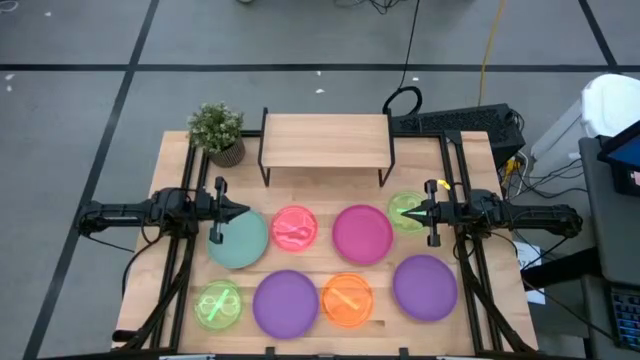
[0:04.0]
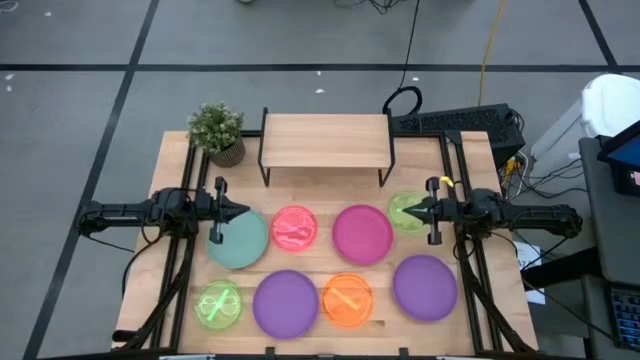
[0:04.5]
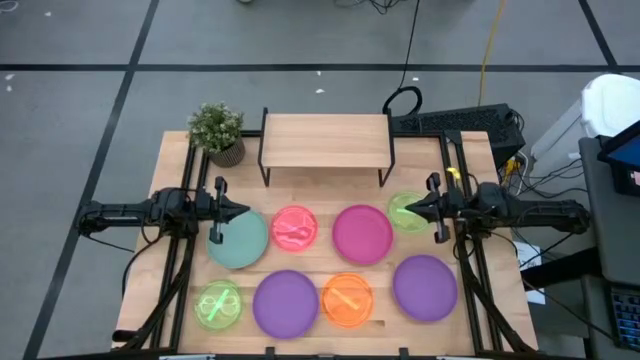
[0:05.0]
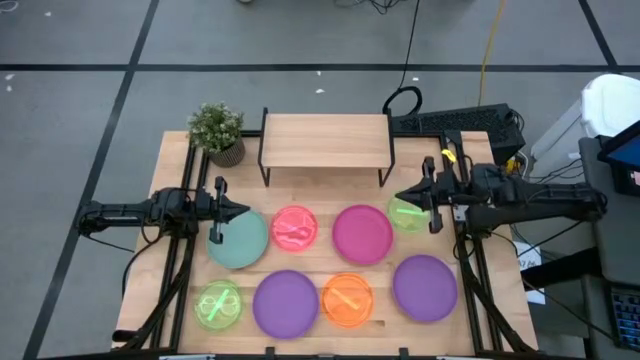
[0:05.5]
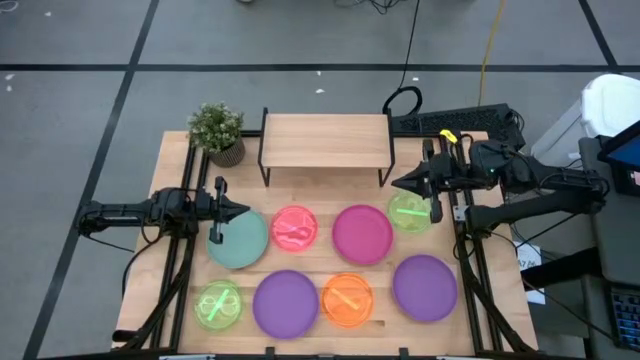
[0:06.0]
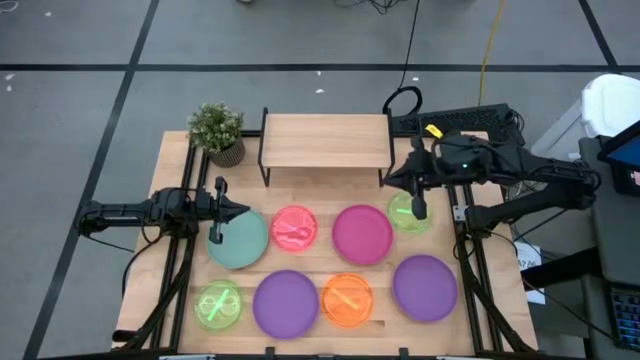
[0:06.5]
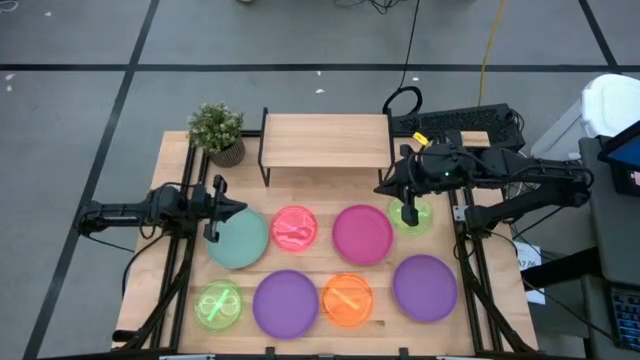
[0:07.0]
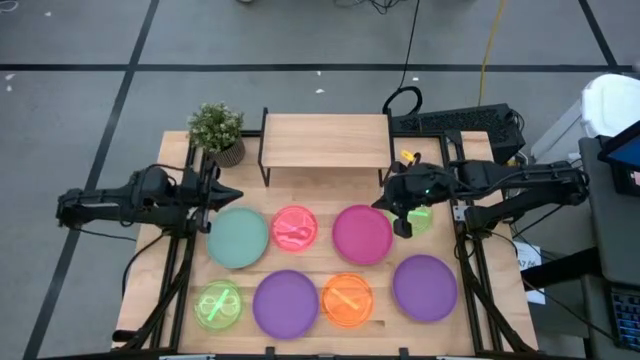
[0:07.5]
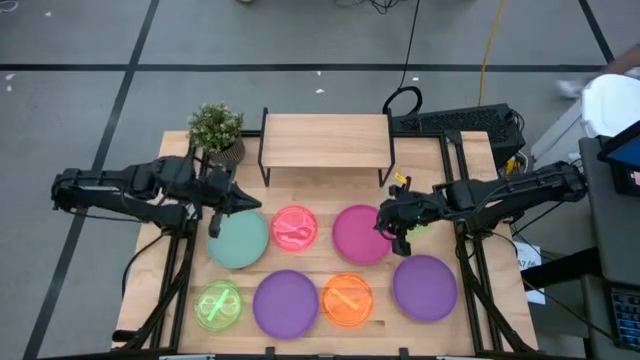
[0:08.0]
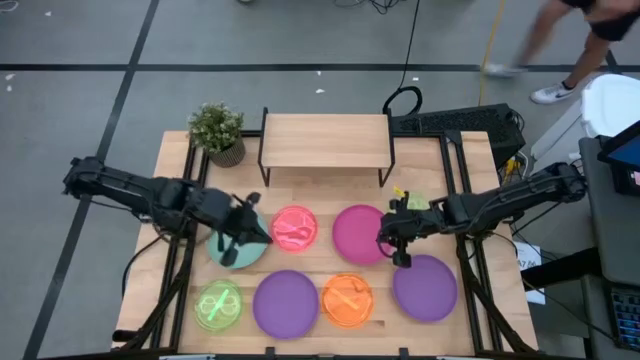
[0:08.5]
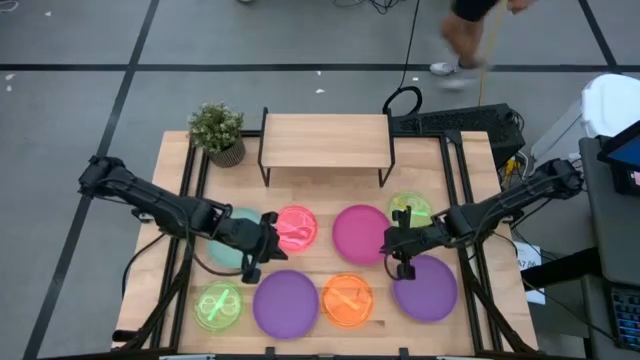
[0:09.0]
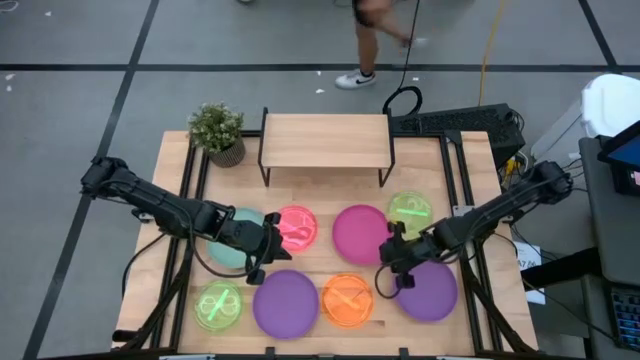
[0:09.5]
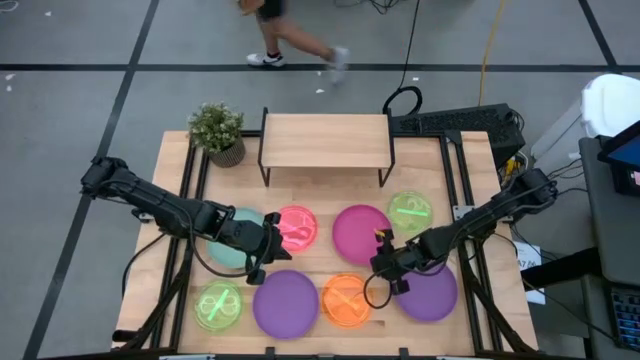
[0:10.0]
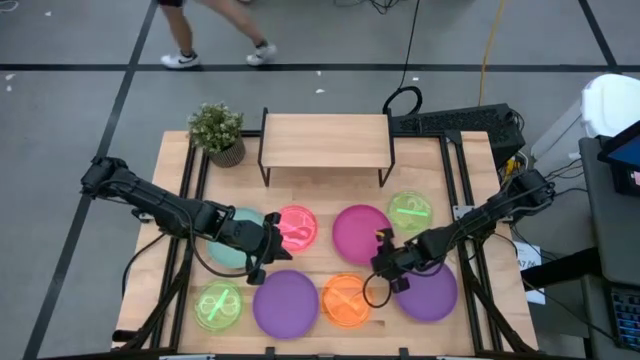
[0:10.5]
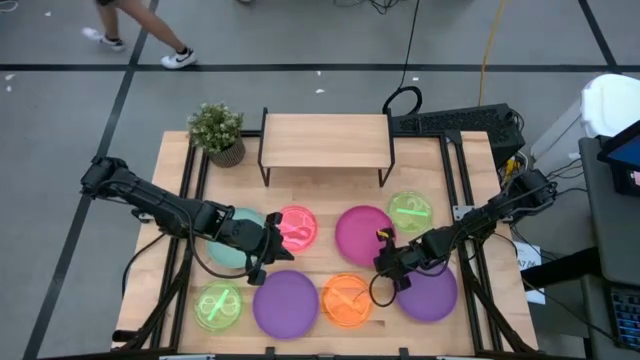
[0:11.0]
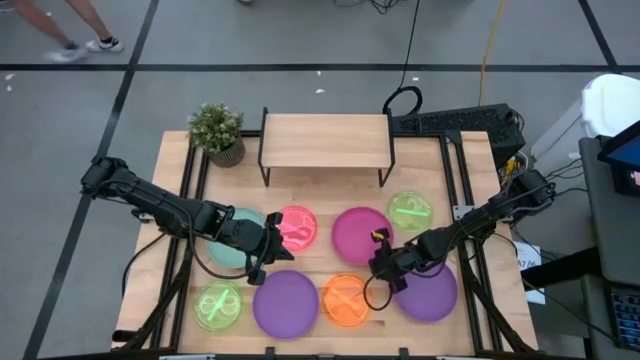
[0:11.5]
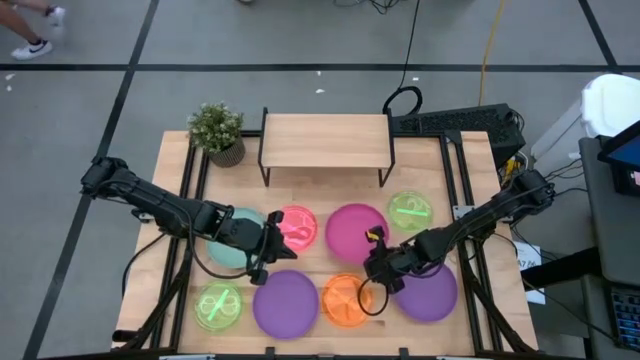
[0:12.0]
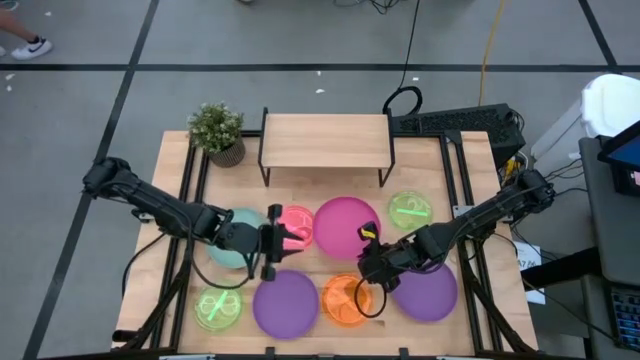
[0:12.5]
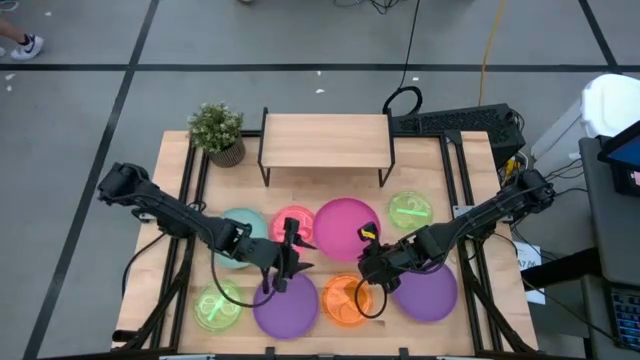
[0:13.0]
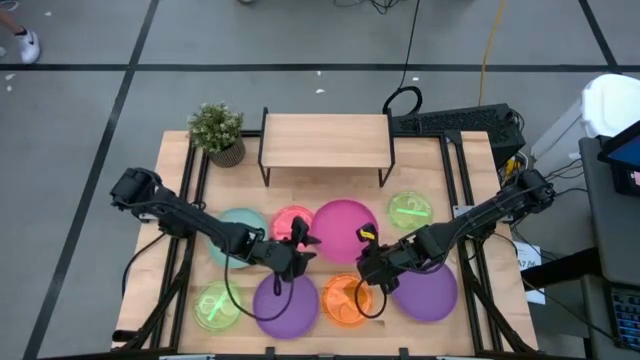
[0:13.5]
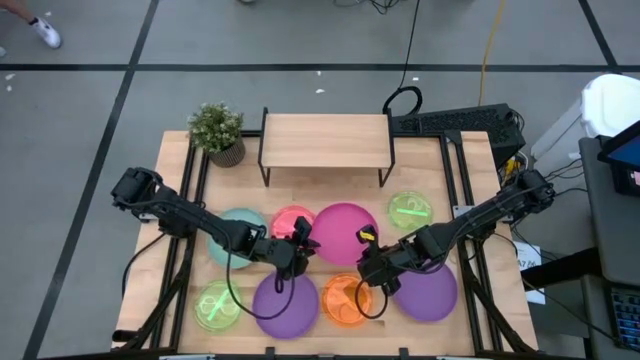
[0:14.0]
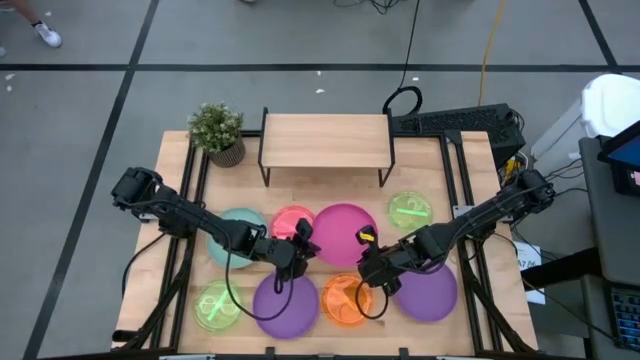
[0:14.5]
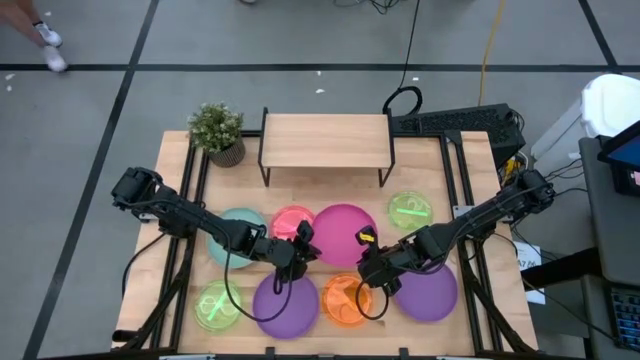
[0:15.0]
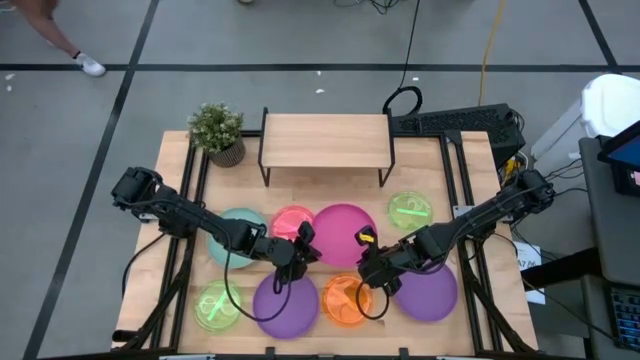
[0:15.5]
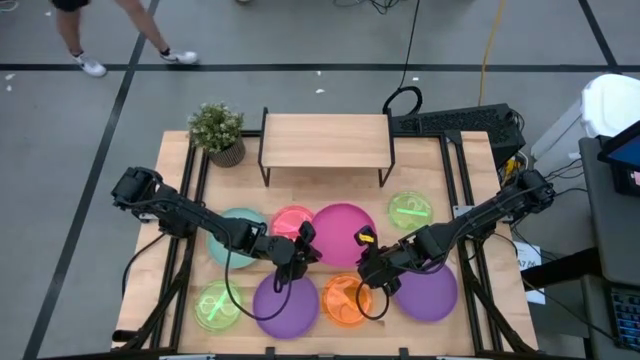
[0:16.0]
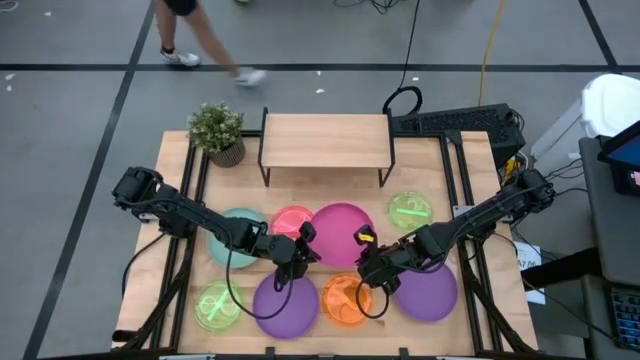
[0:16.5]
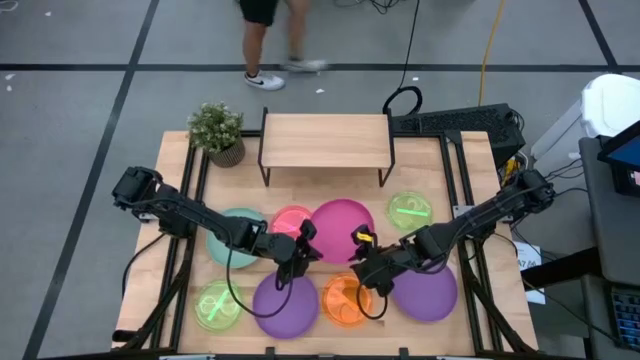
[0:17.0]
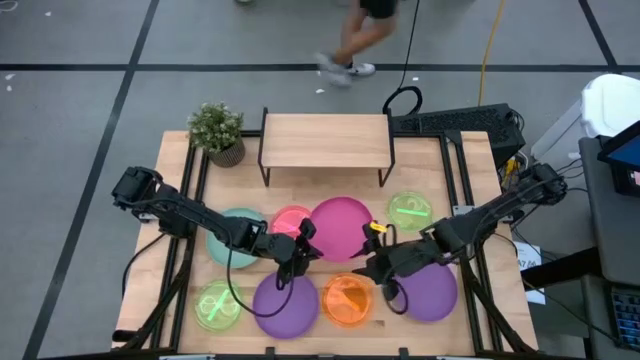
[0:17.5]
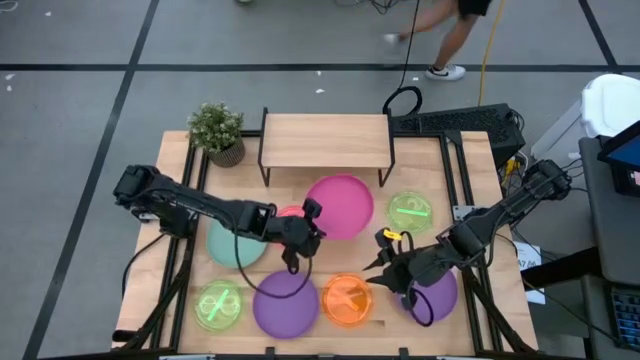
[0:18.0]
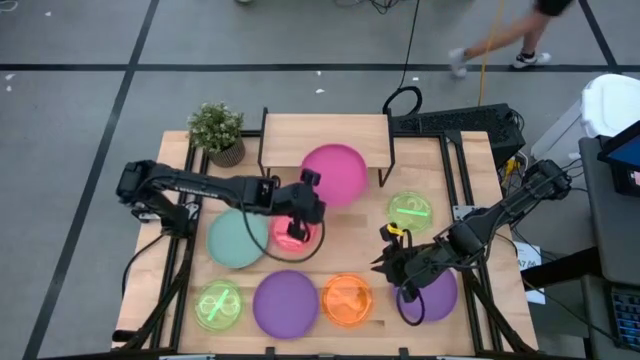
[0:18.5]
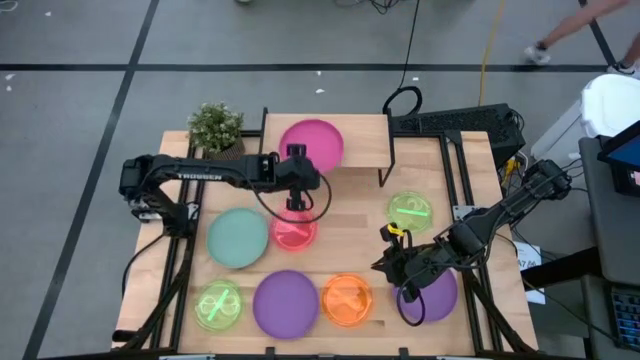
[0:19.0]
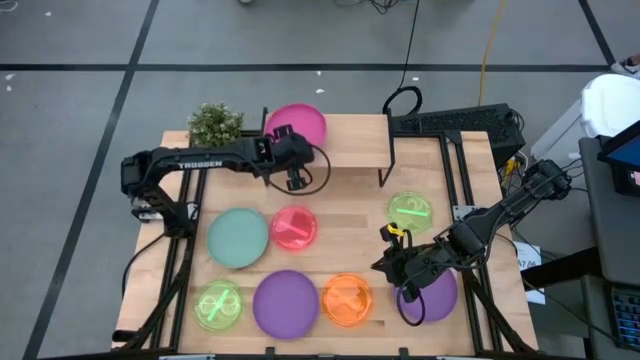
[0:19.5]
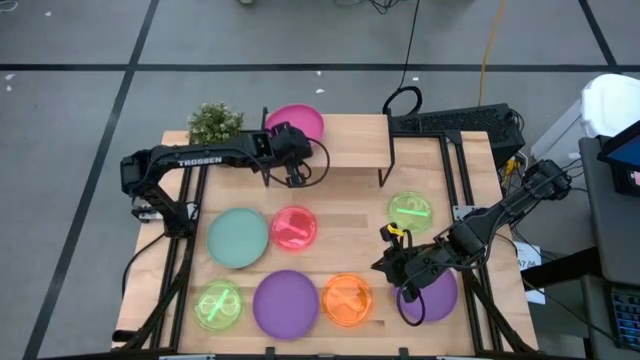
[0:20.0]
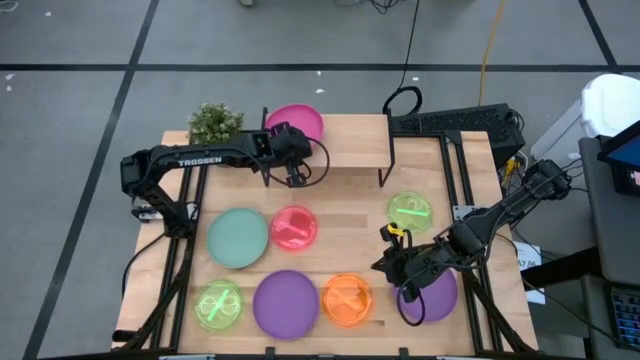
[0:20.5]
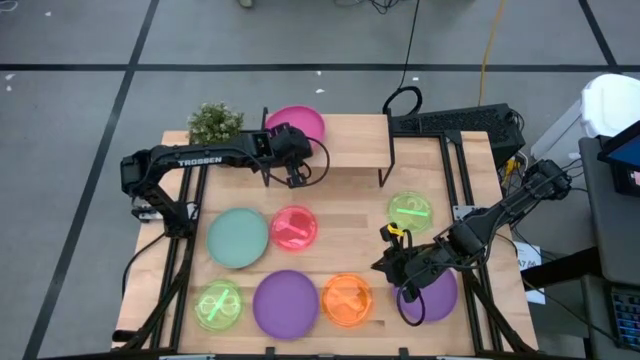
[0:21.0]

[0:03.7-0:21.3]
Task: Place and stack plates onto a shelf
Put the pink plate on the shelf

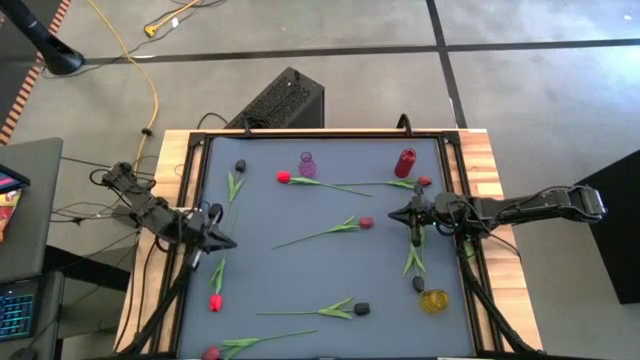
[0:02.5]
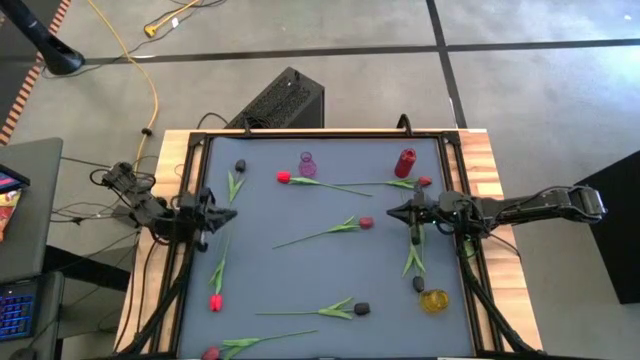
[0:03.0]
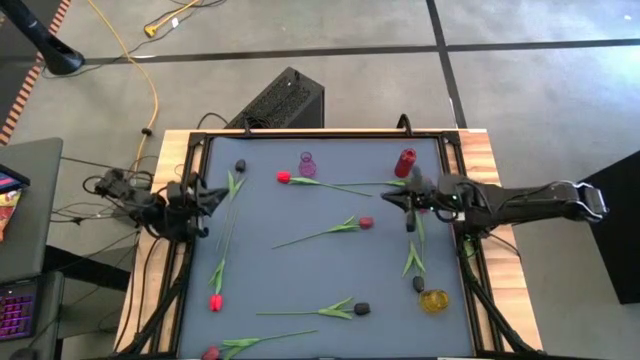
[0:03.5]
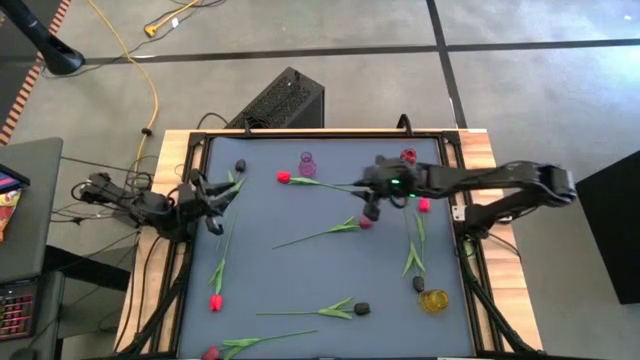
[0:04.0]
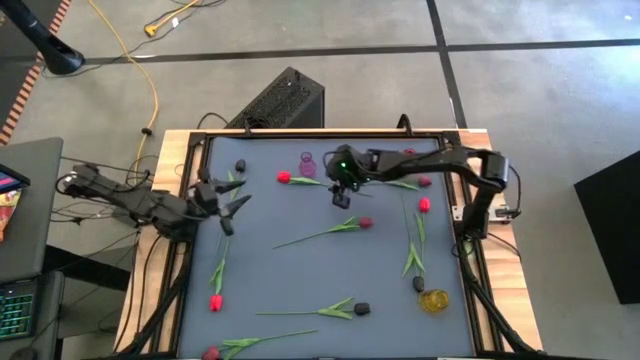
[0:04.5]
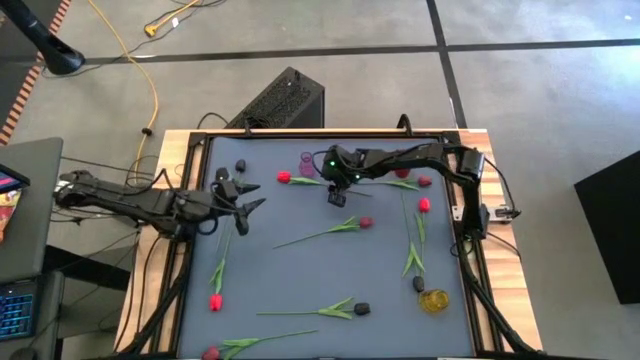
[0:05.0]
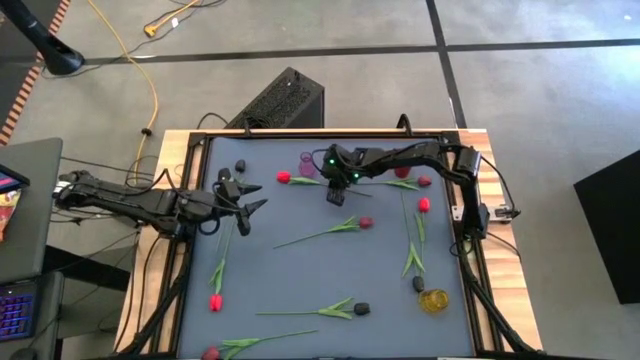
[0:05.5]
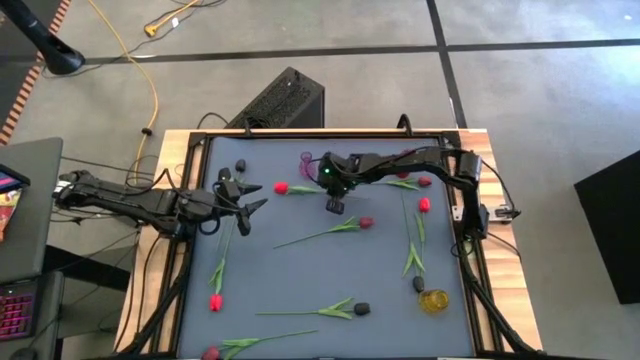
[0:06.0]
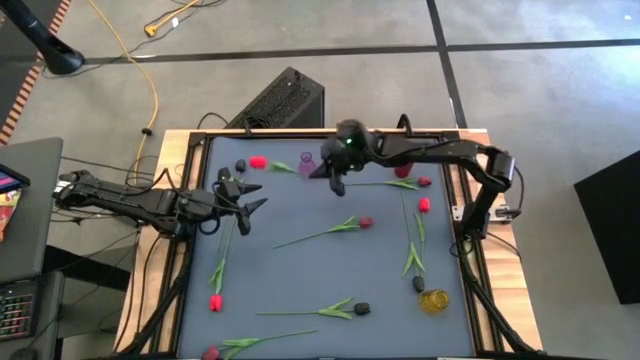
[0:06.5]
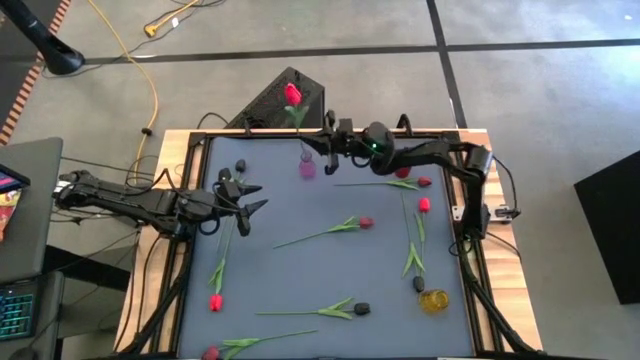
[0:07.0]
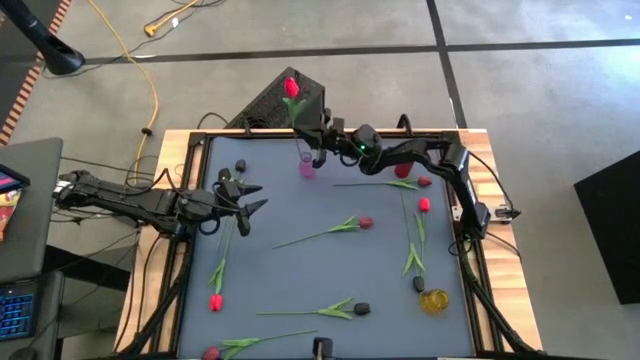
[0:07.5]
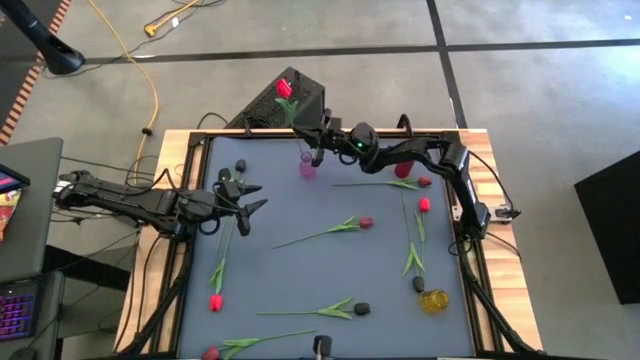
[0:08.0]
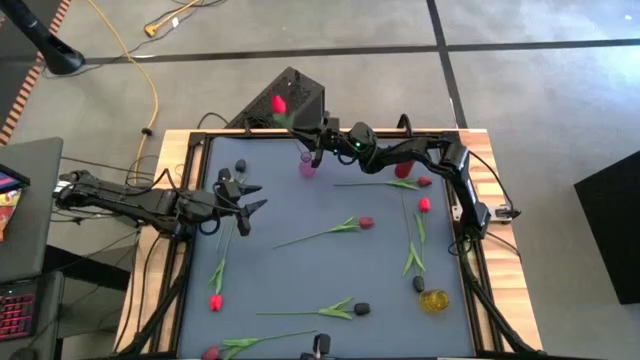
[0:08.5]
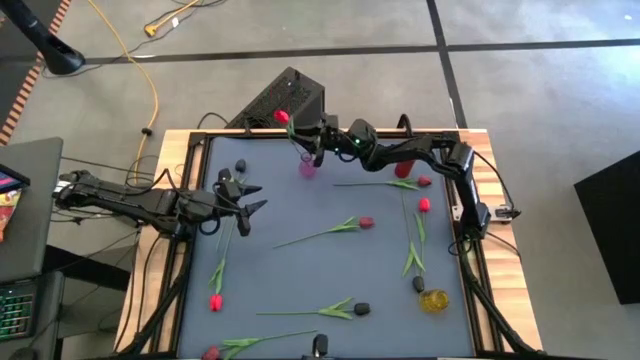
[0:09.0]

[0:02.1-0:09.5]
Task: Sort flowers into vase by color
Put the middle pink flower into the purple vase
